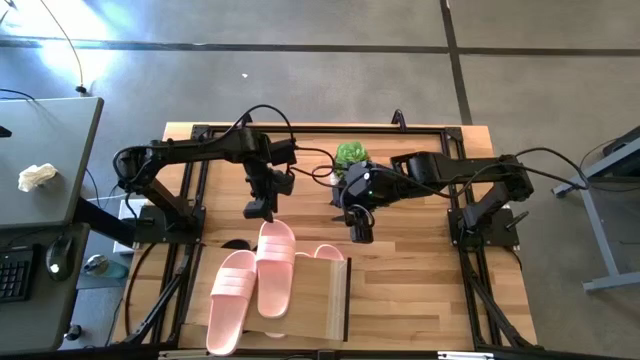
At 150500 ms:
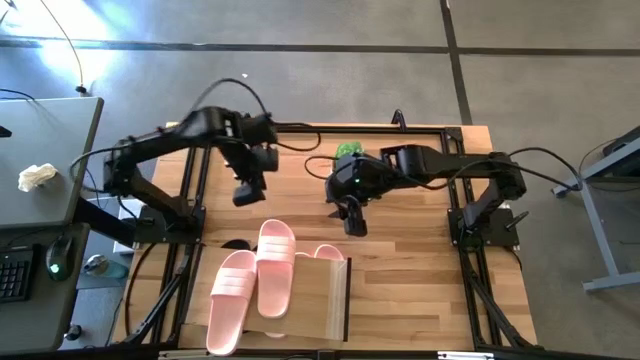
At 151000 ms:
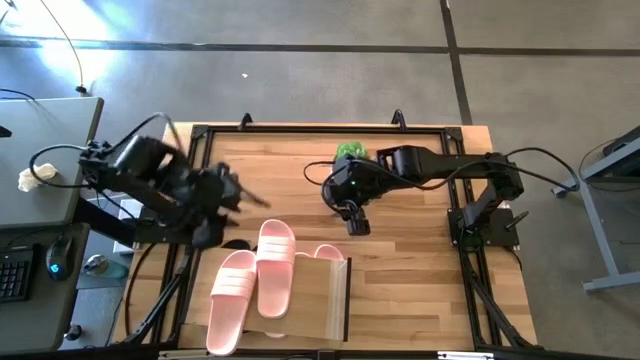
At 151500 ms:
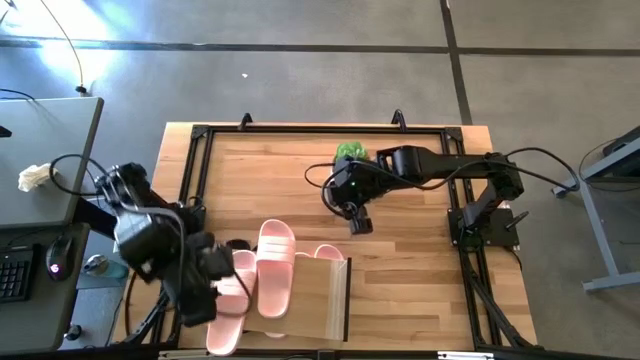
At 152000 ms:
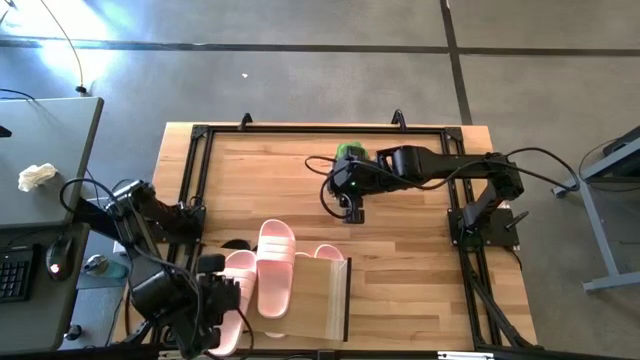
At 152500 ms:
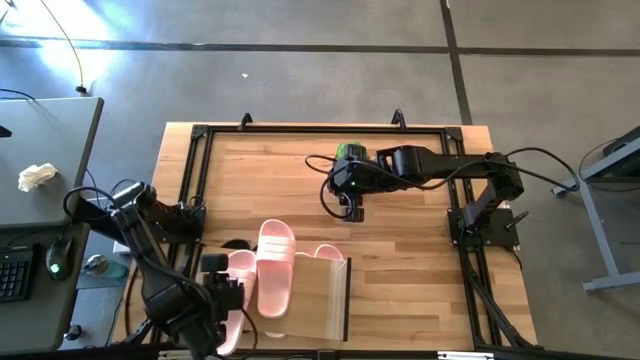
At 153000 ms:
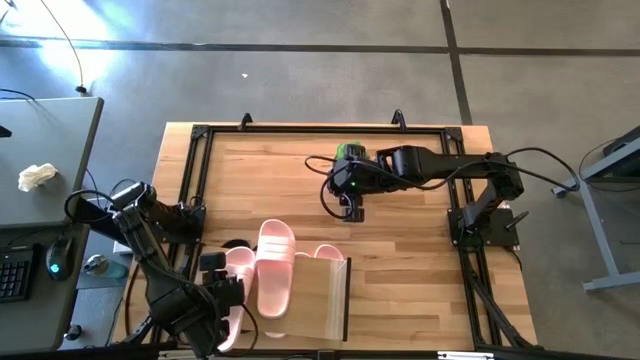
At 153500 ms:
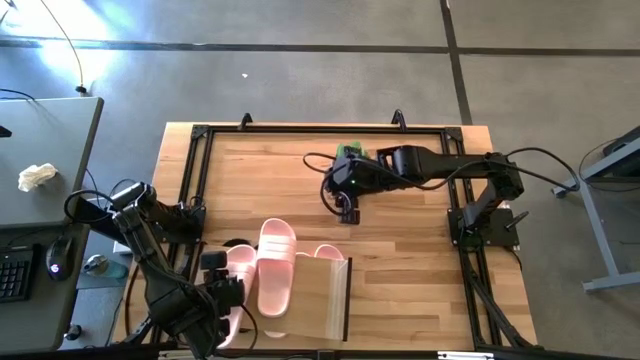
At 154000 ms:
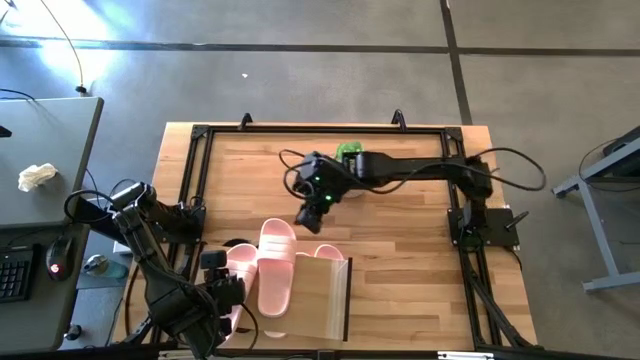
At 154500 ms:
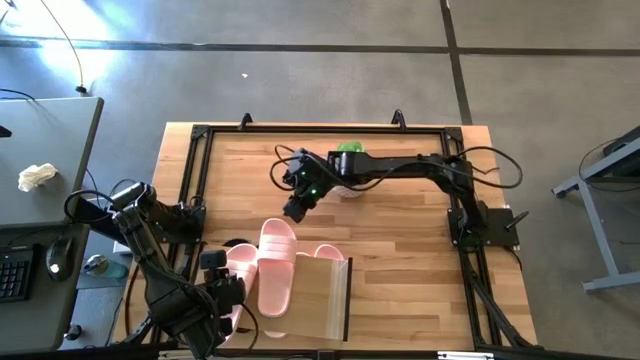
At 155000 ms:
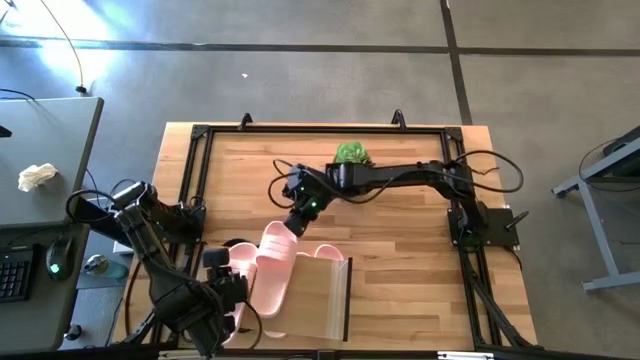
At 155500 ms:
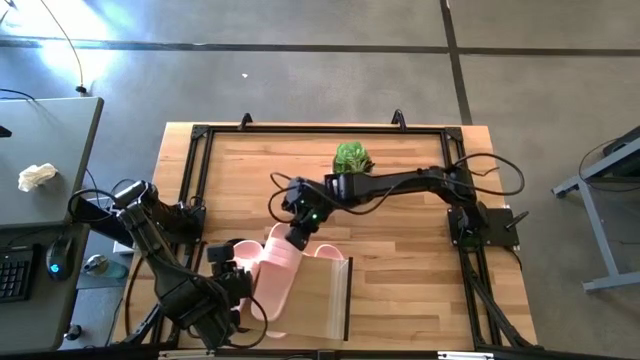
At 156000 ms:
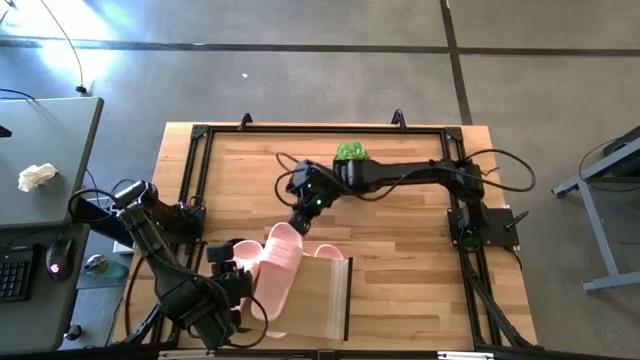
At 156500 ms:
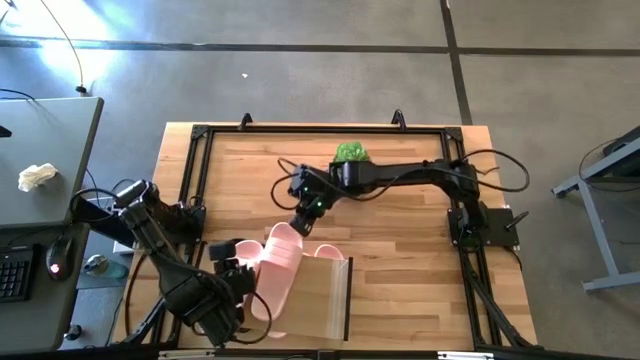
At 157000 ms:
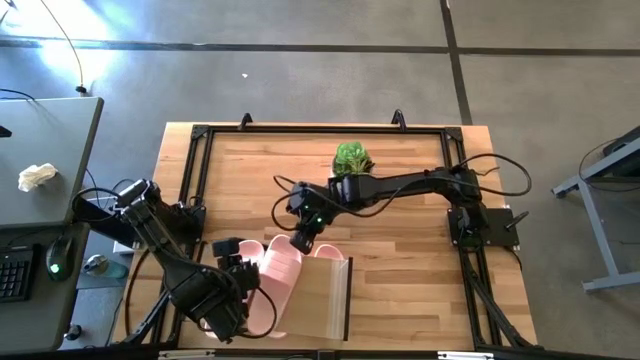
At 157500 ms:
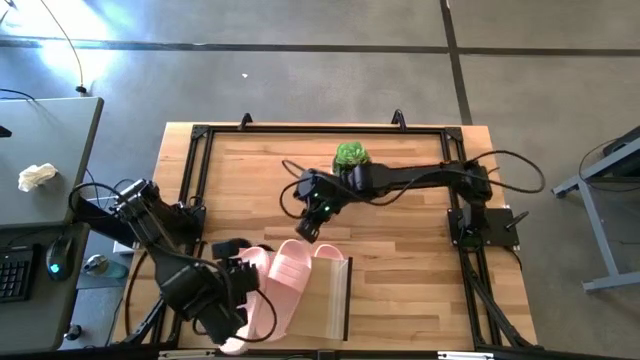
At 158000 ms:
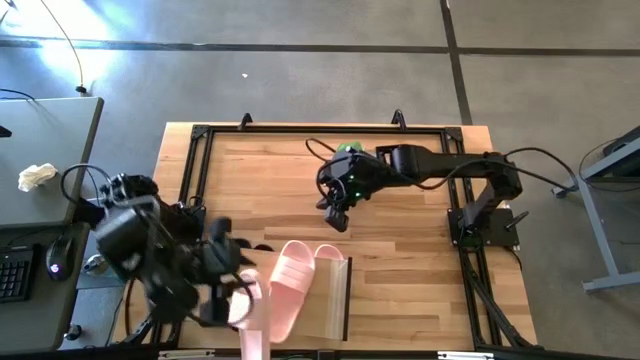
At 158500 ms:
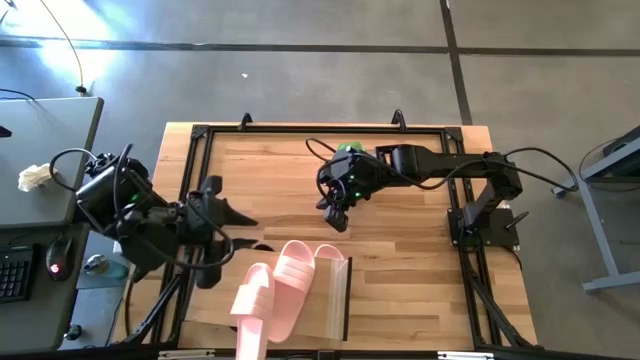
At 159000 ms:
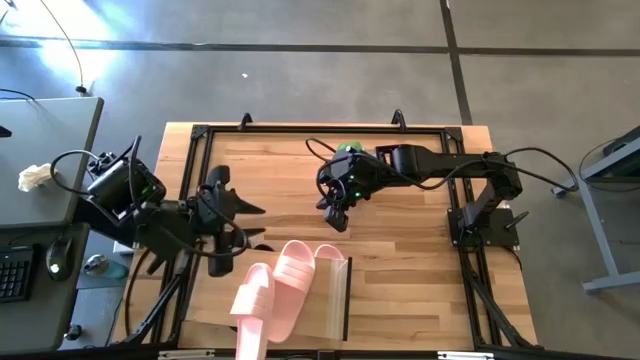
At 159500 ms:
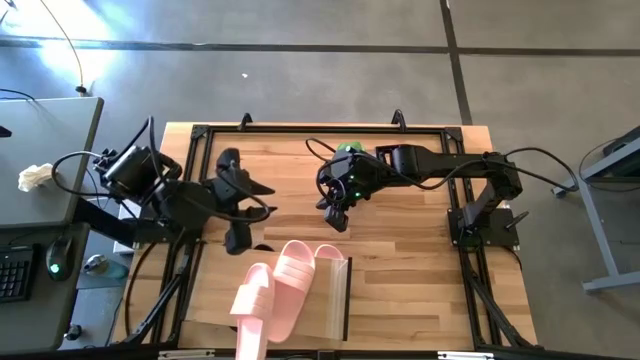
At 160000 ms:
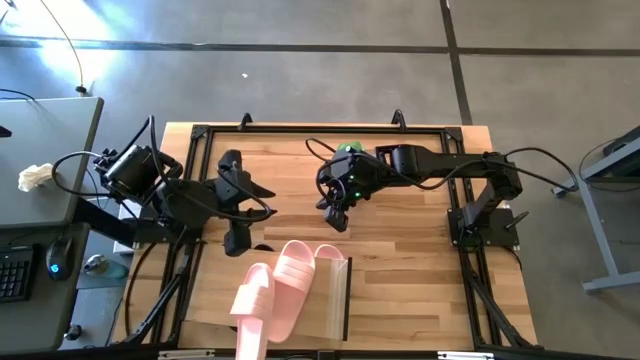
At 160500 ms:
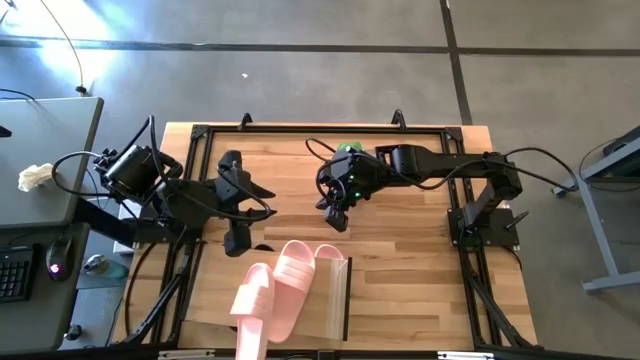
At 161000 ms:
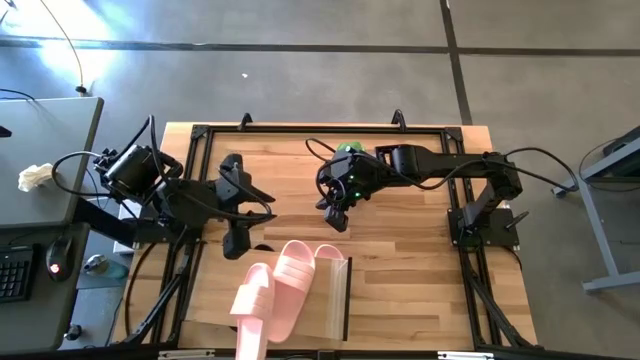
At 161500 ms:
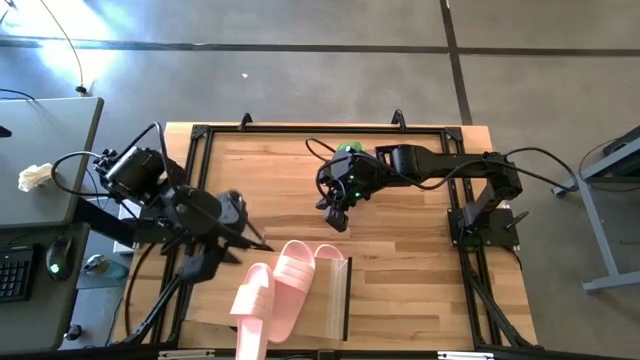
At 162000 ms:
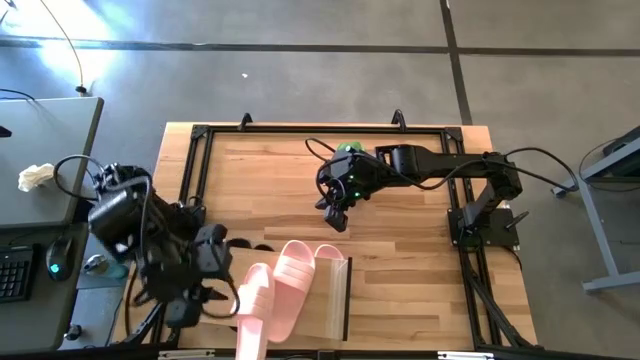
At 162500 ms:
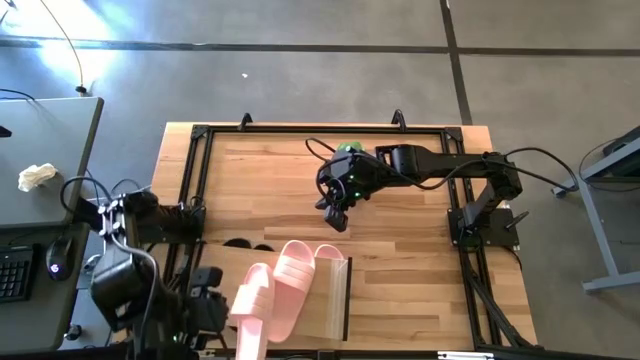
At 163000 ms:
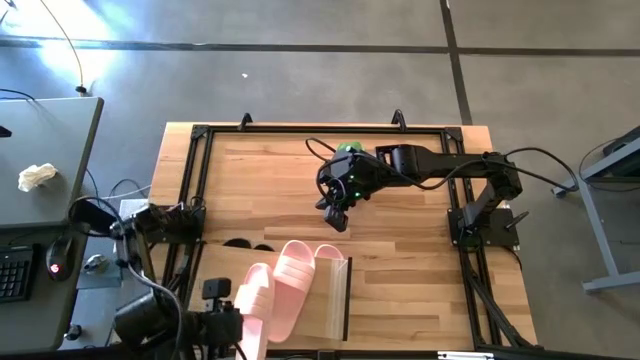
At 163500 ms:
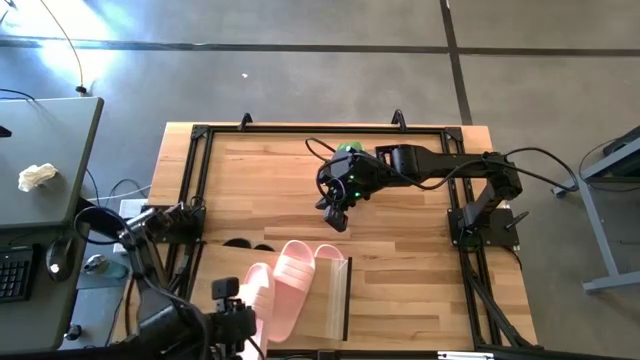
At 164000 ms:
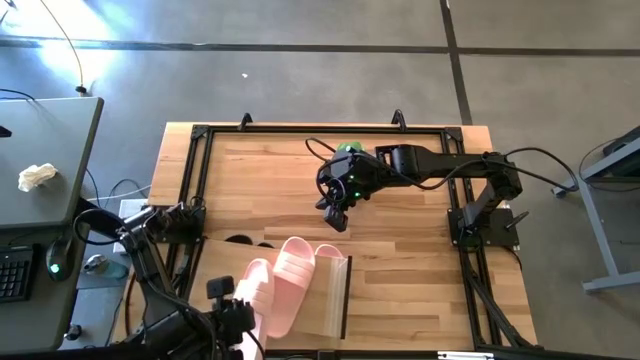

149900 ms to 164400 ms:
Task: Pick and place slides into the shelf
Adjust the pink slides on the shelf

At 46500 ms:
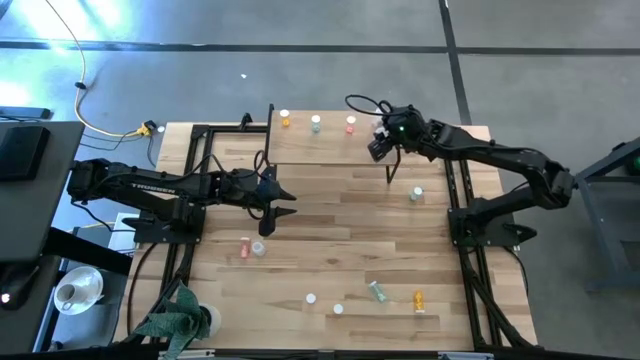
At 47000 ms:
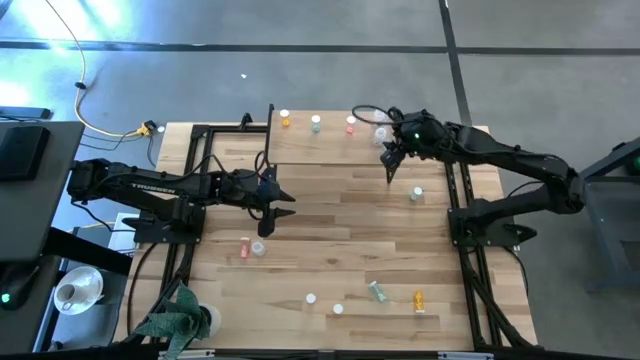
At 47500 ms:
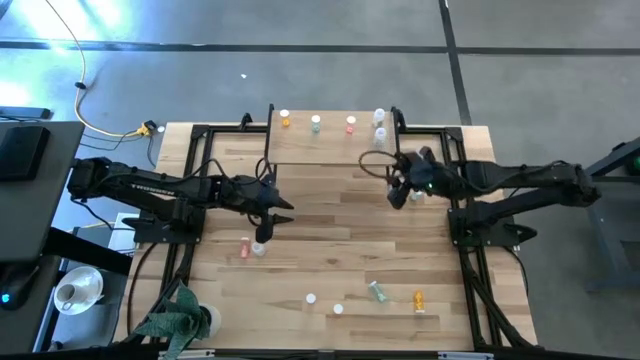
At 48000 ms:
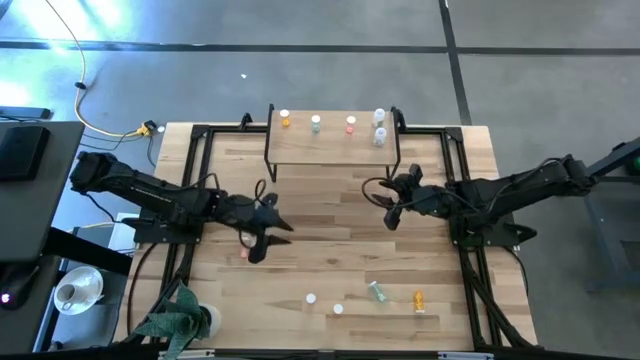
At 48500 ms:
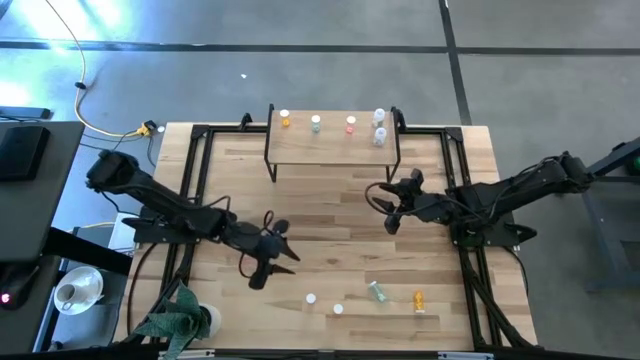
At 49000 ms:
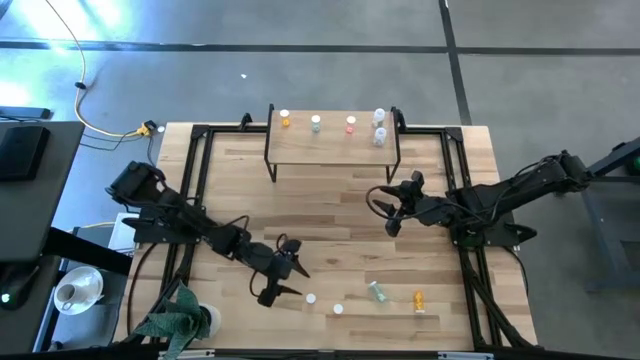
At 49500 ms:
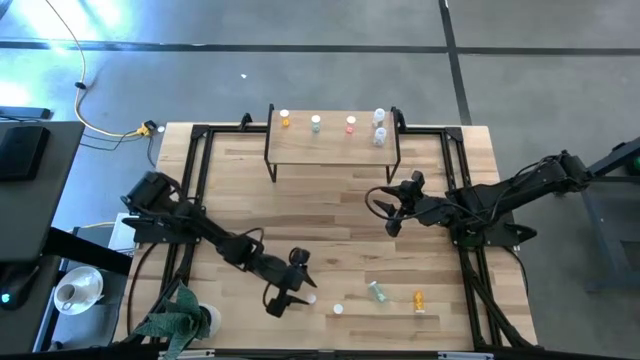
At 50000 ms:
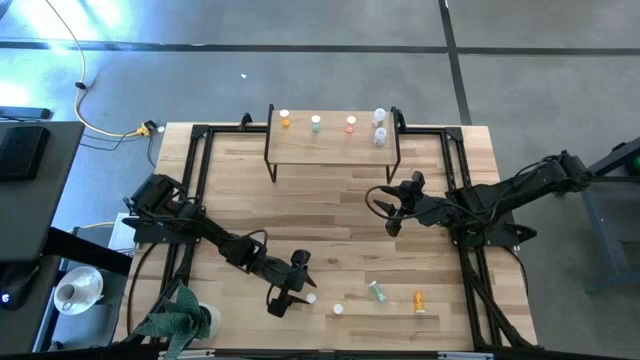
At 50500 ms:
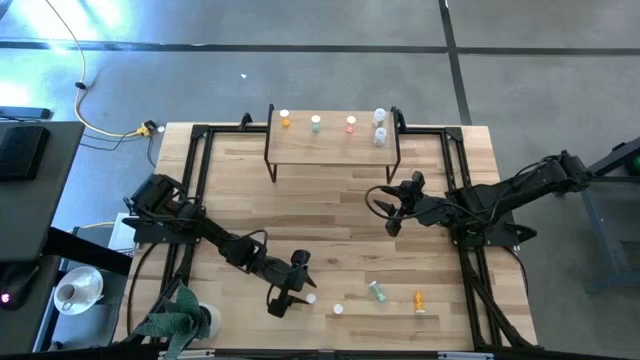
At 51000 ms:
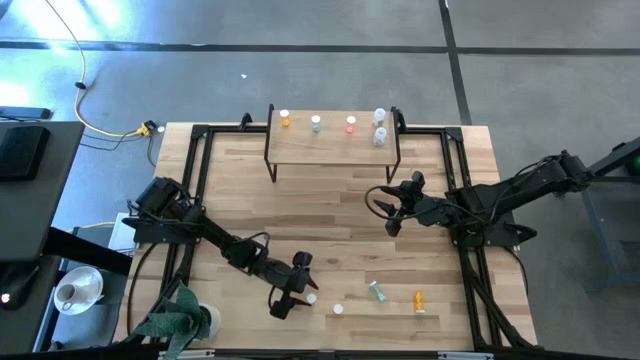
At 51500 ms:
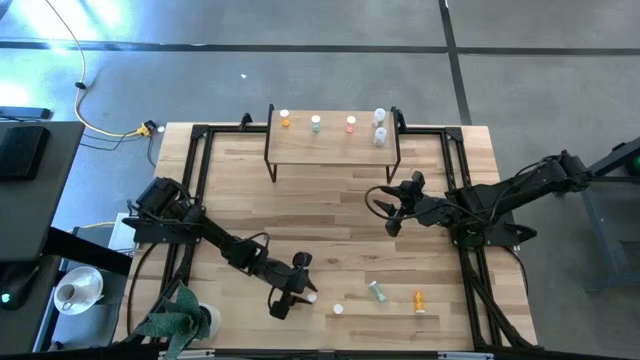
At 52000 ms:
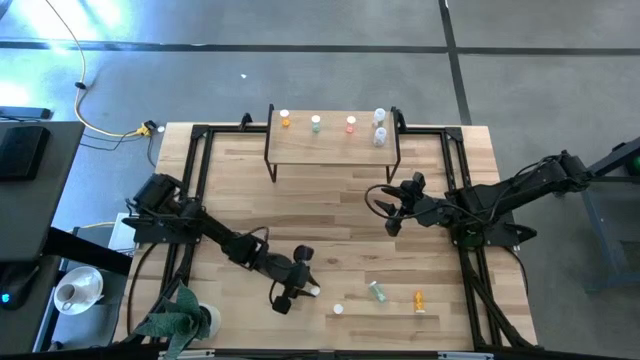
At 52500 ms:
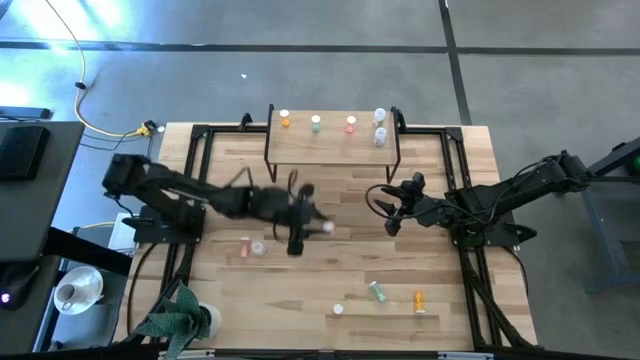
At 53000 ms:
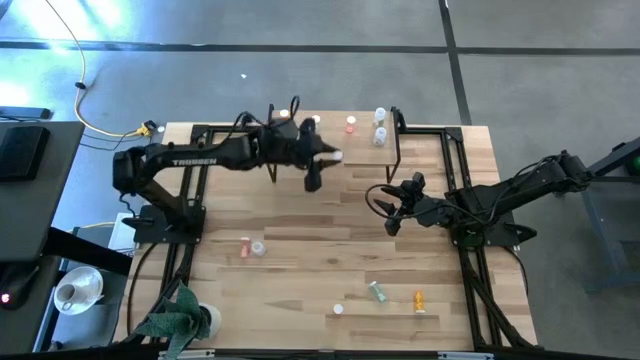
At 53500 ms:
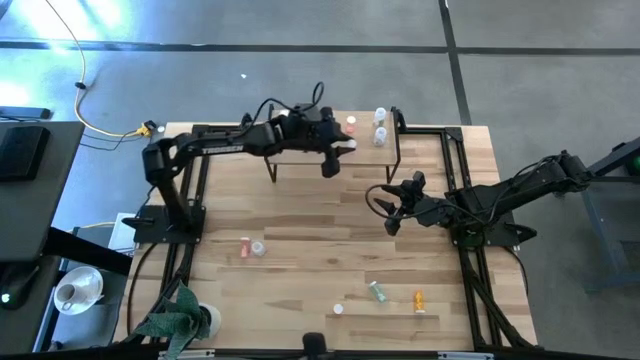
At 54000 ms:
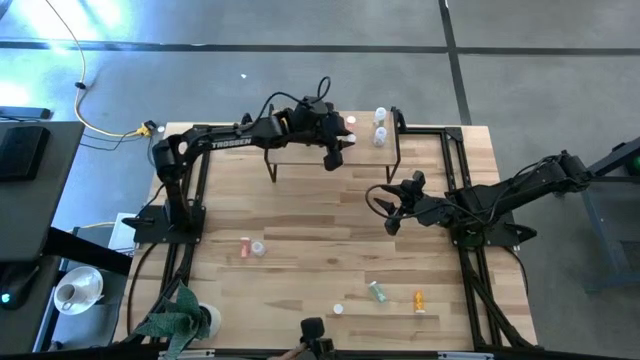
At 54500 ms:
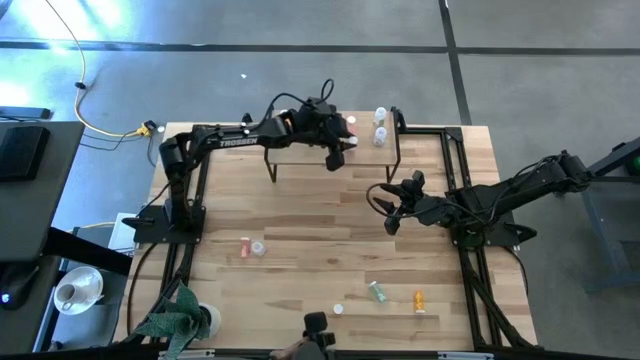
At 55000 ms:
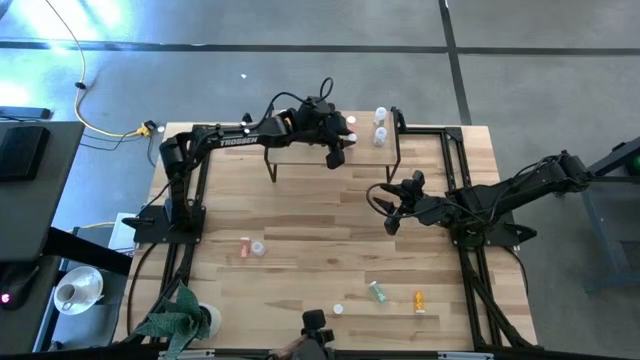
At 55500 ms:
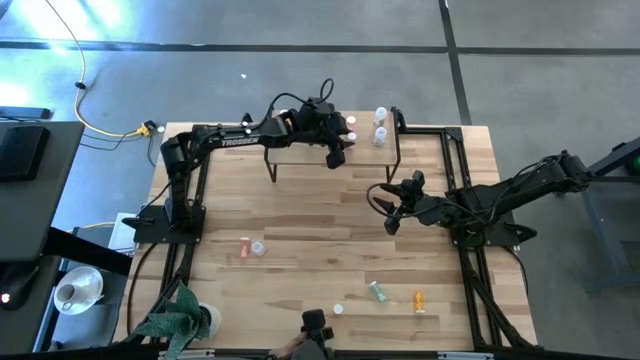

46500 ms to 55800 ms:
Task: Pick and place medicine bottles onto shelf by color
Put the bottom pink pill bottle on the shelf
